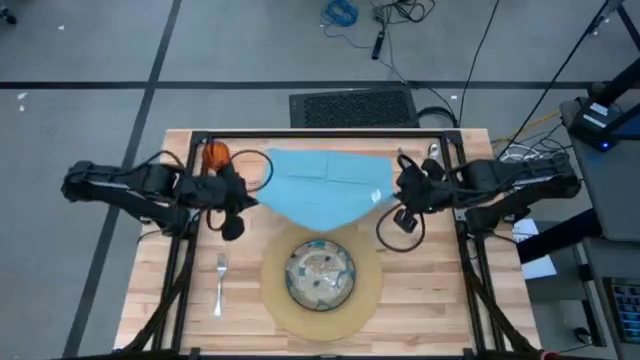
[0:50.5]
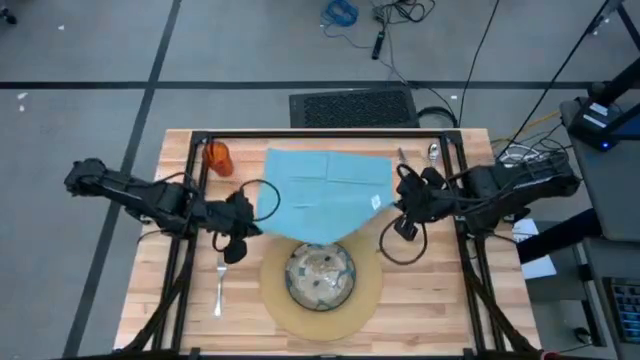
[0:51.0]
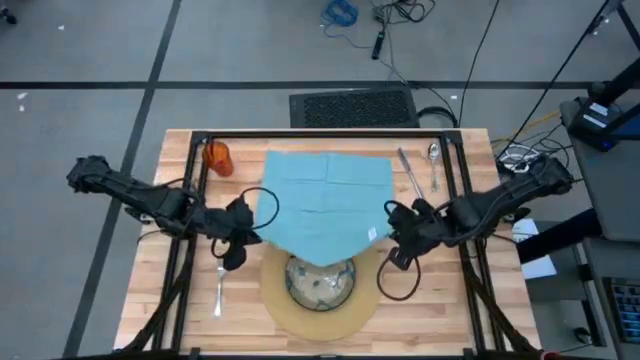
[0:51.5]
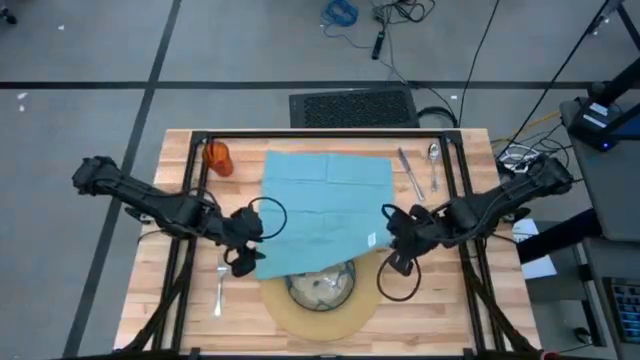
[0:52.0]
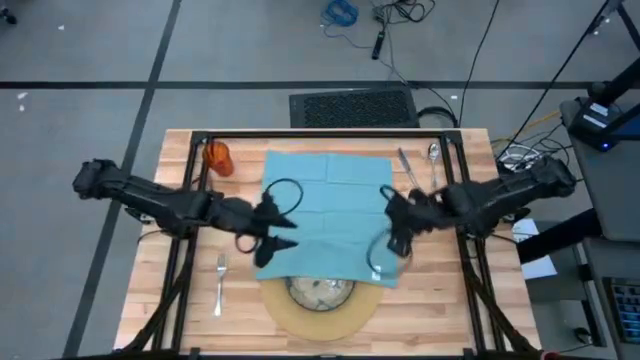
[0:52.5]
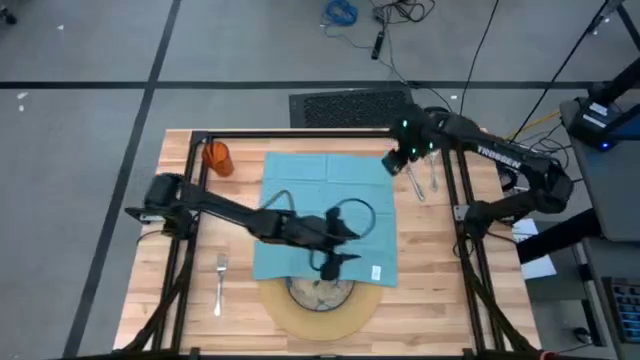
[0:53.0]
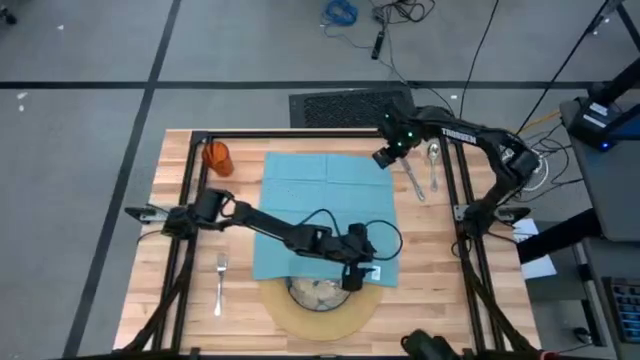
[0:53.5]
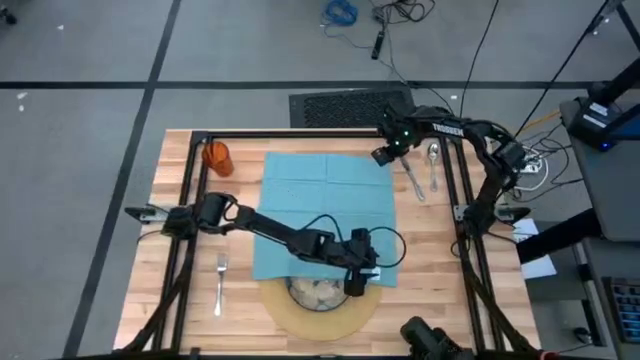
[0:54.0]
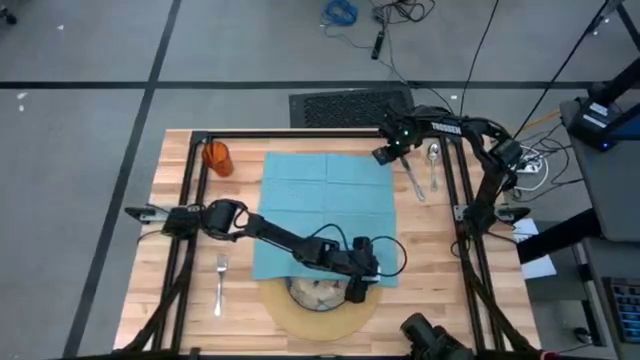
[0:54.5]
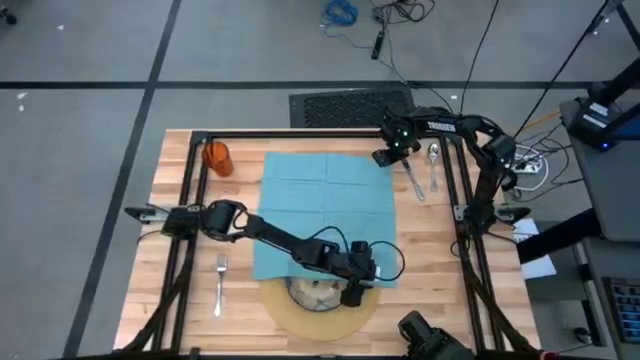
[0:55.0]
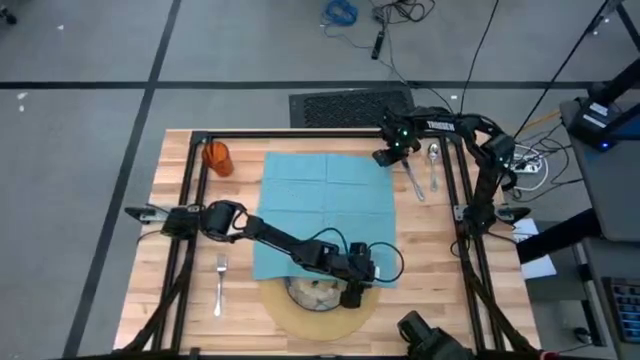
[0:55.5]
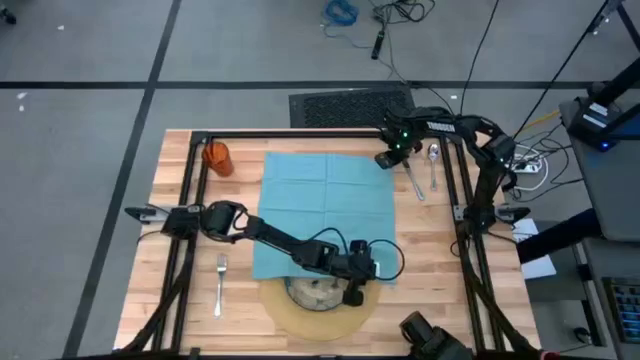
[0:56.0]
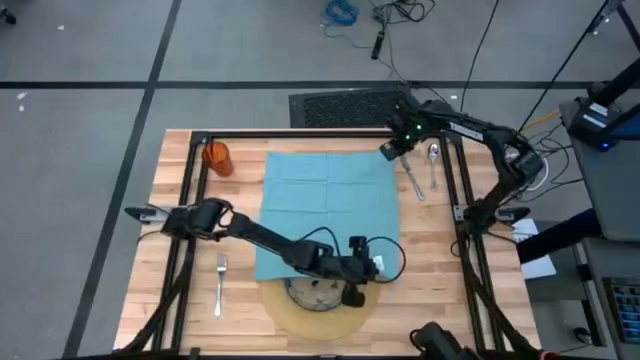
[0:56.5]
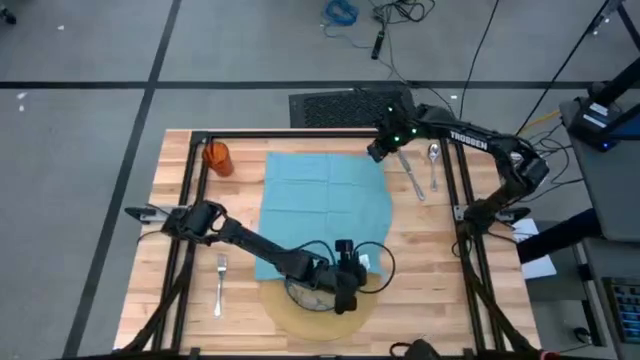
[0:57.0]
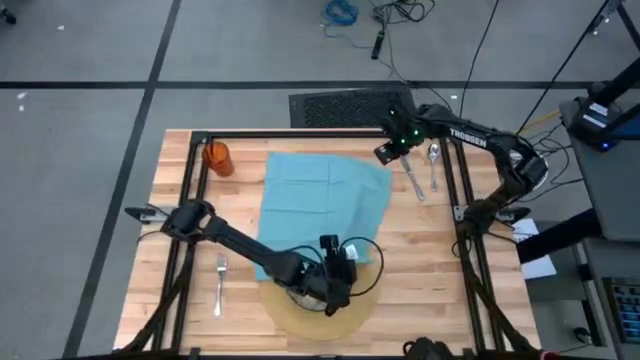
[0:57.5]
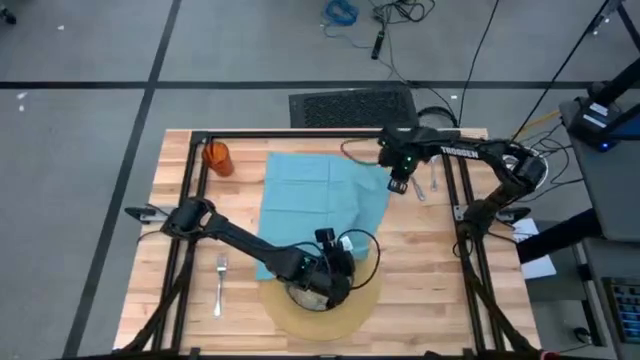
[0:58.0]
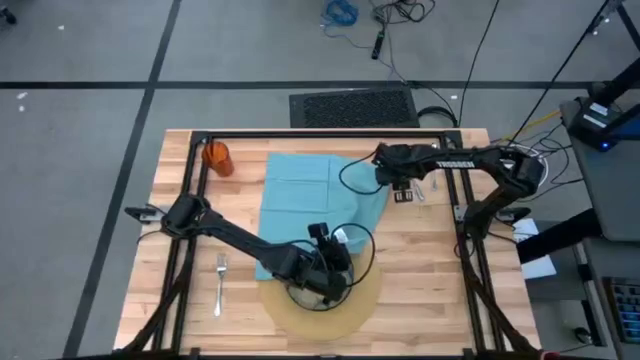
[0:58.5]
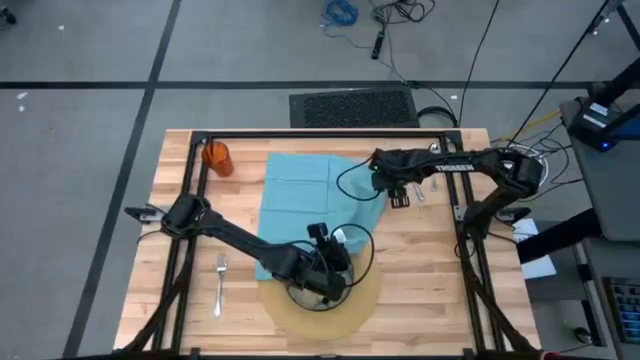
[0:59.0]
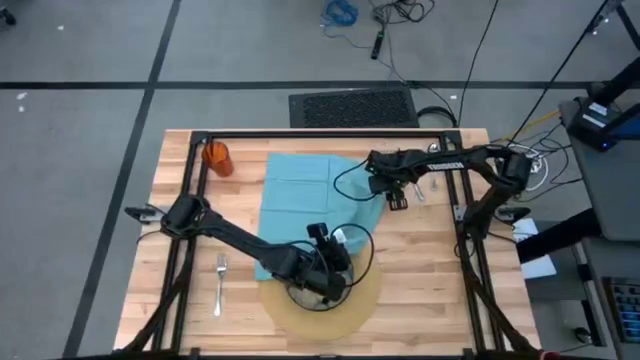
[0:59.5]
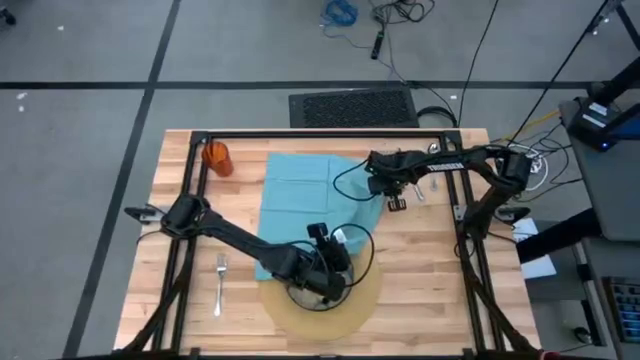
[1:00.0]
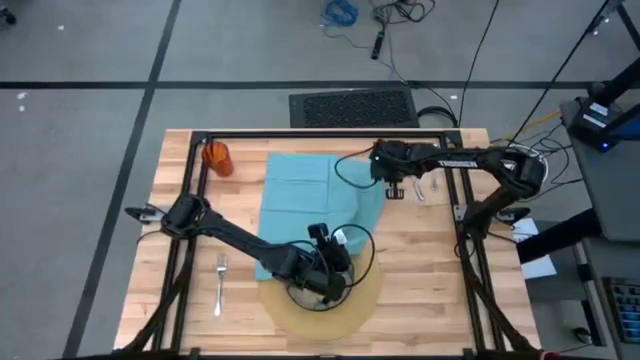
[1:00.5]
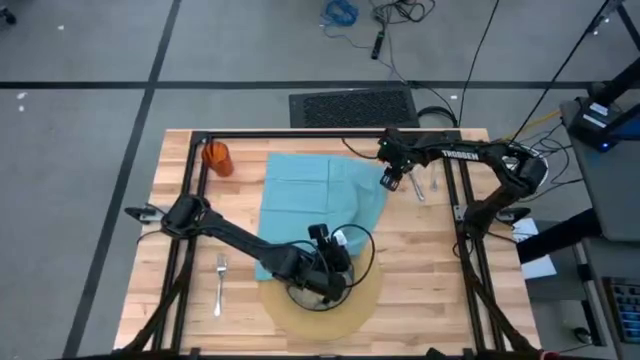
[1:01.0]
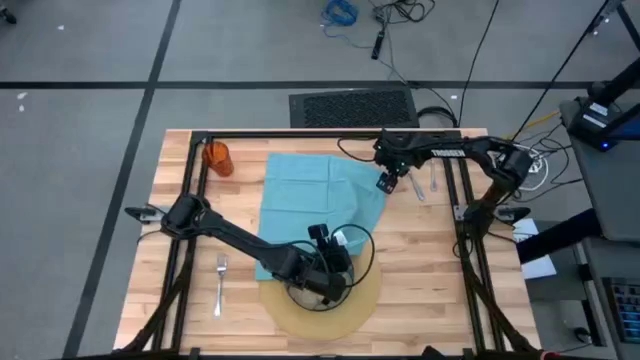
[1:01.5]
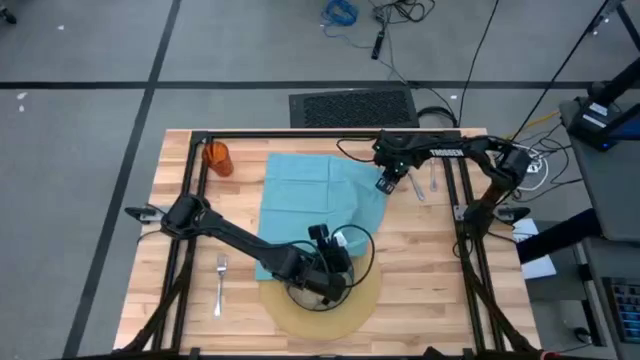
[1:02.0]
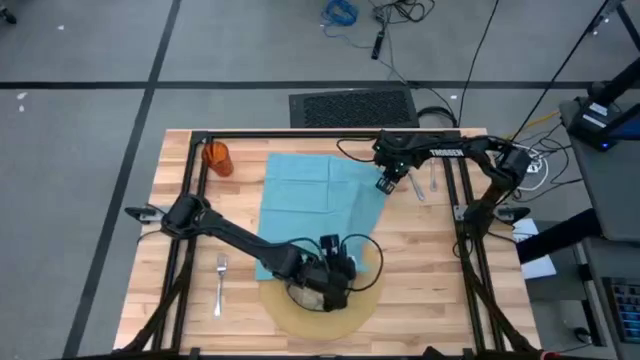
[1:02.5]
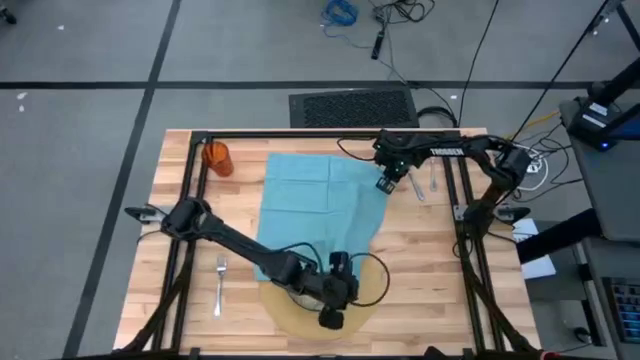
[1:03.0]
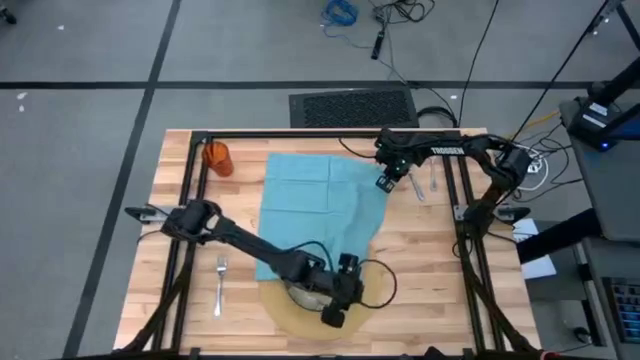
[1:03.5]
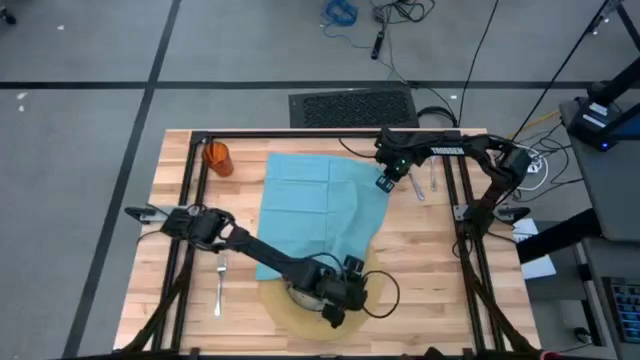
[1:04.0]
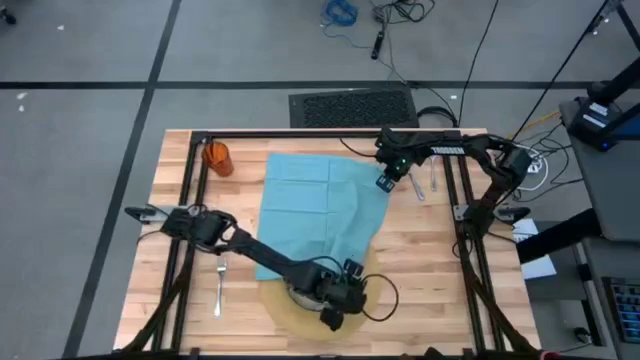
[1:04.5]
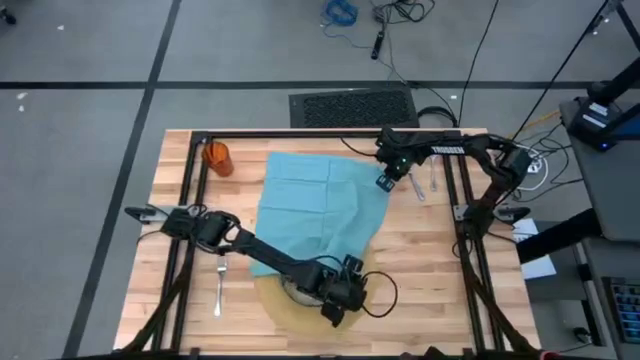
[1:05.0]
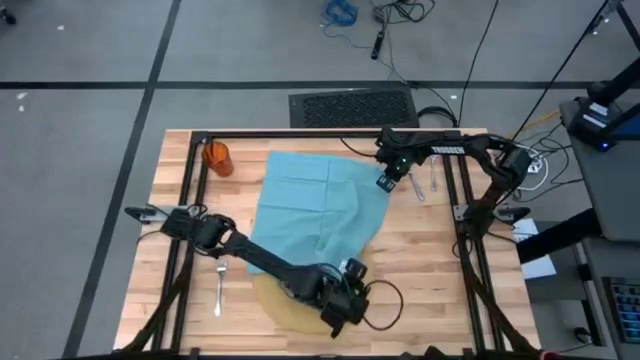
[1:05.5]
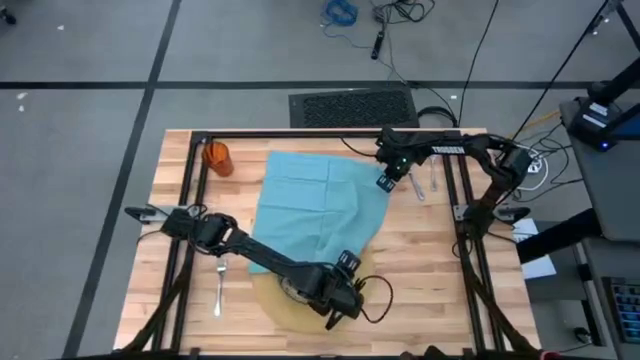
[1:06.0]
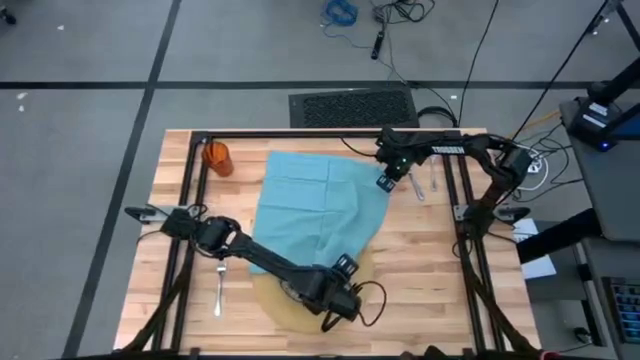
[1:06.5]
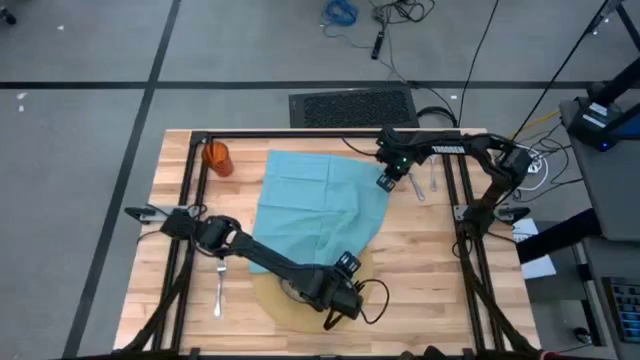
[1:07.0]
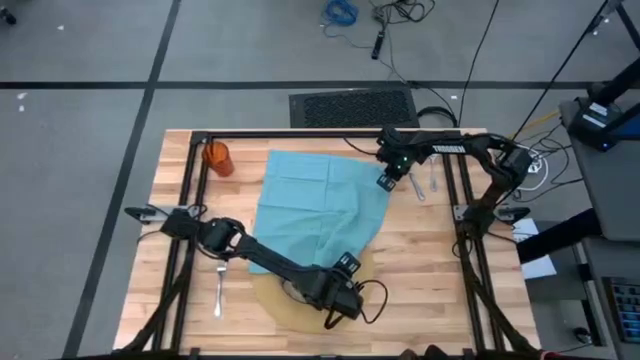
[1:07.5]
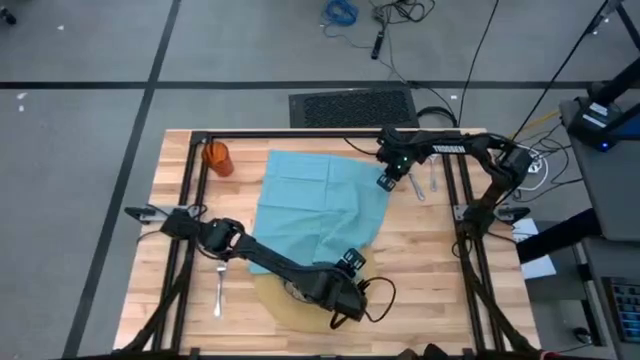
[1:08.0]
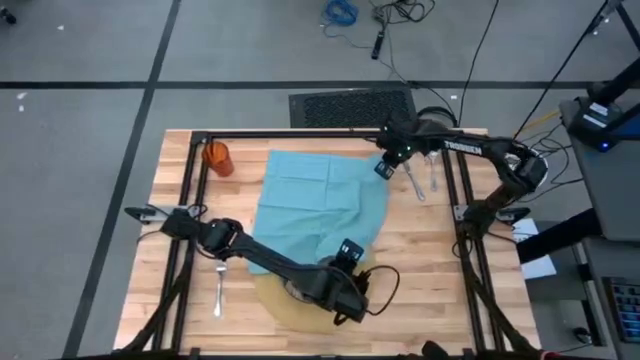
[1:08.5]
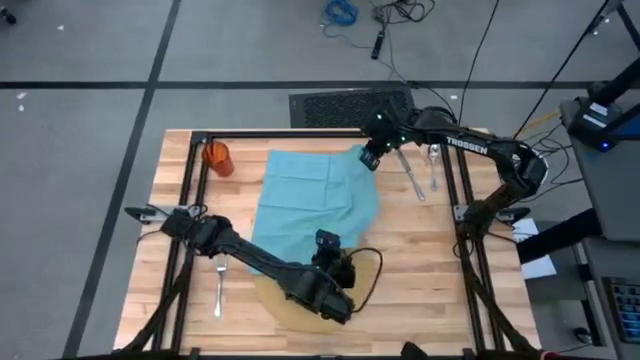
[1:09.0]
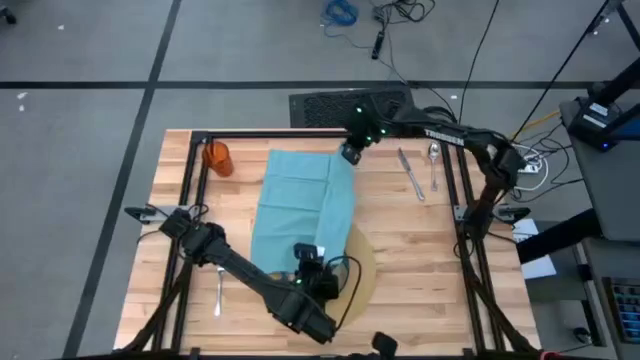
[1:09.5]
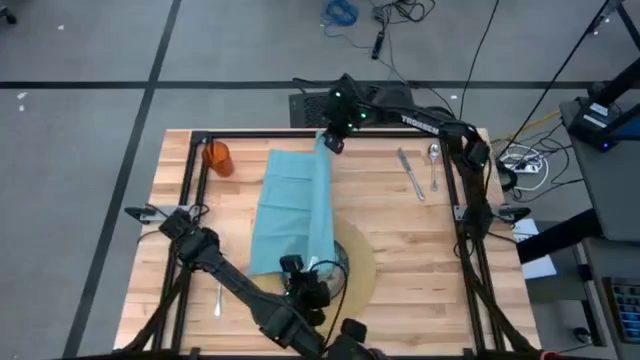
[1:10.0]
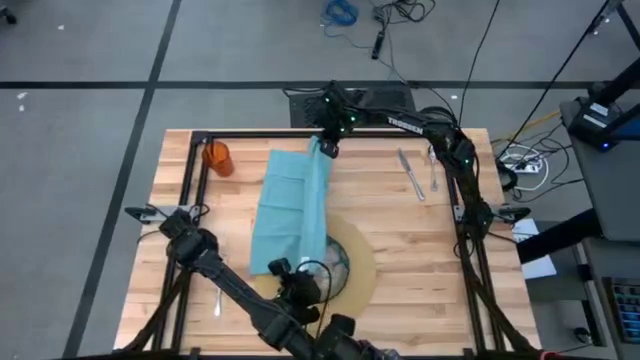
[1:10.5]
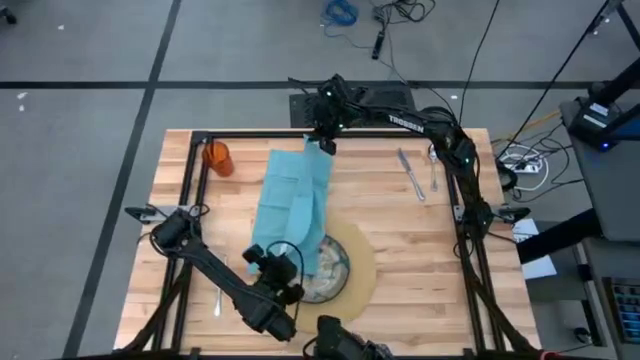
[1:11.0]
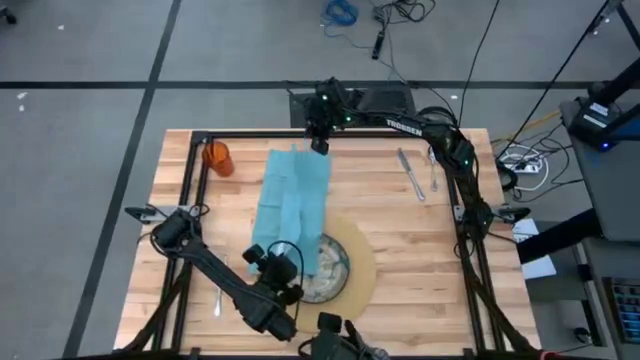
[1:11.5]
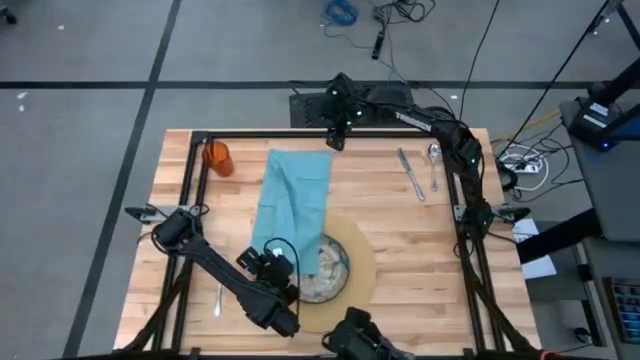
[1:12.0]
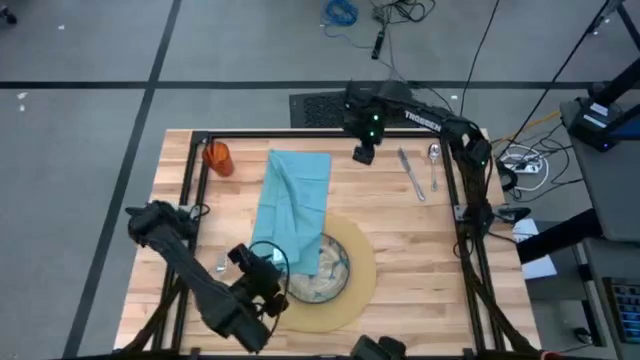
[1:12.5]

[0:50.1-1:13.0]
Task: Set table place
Fold the blue napkin
